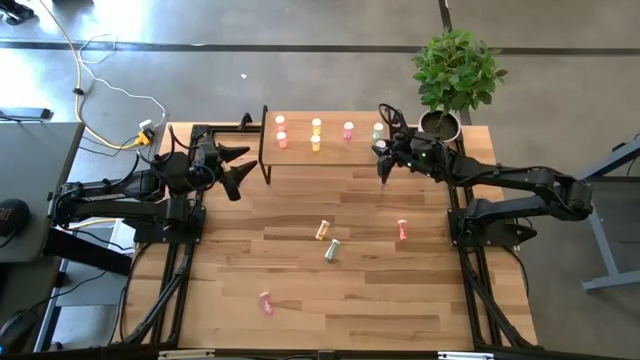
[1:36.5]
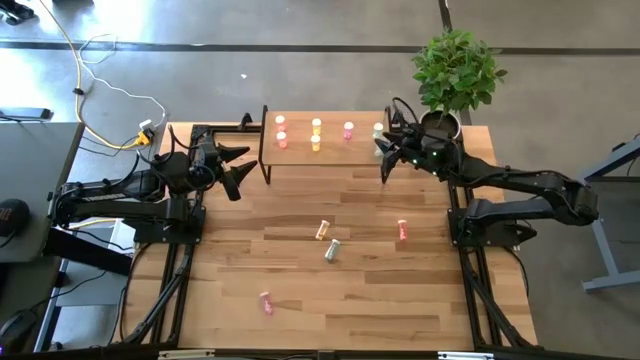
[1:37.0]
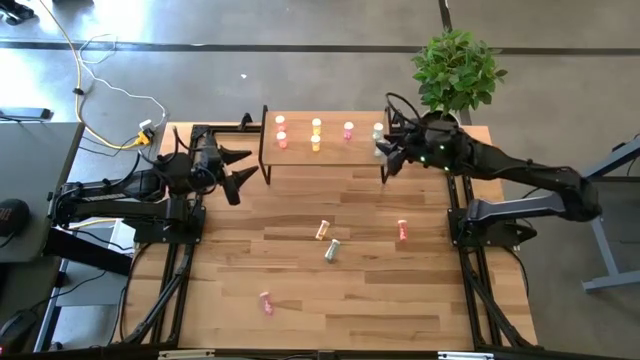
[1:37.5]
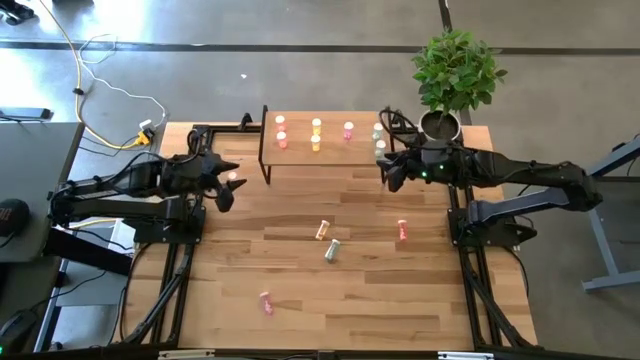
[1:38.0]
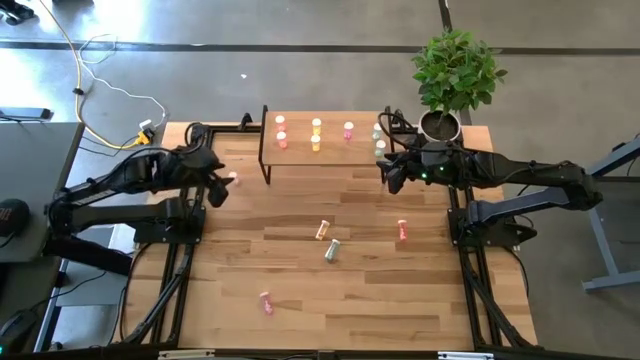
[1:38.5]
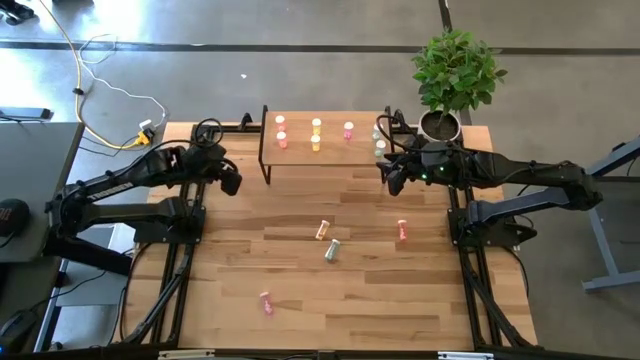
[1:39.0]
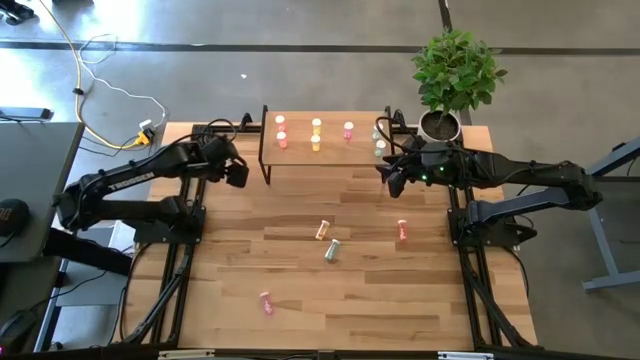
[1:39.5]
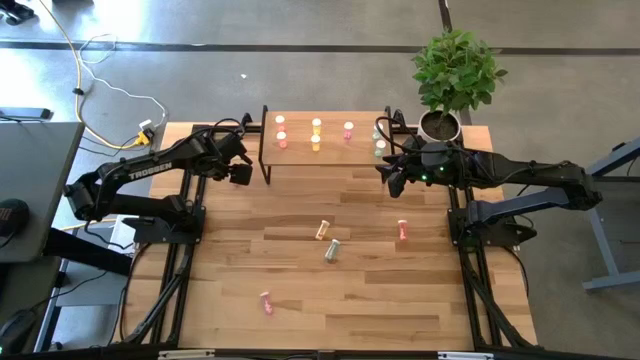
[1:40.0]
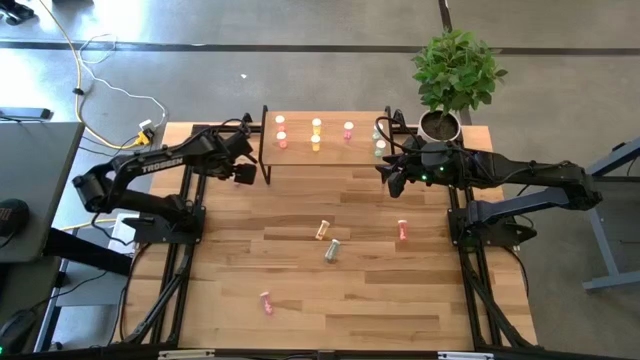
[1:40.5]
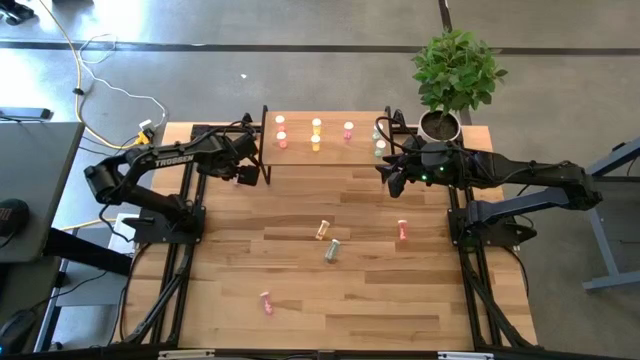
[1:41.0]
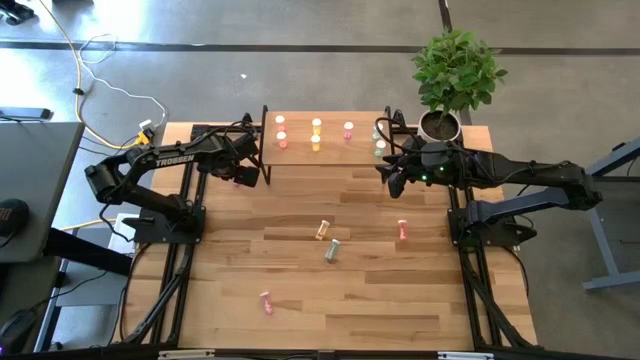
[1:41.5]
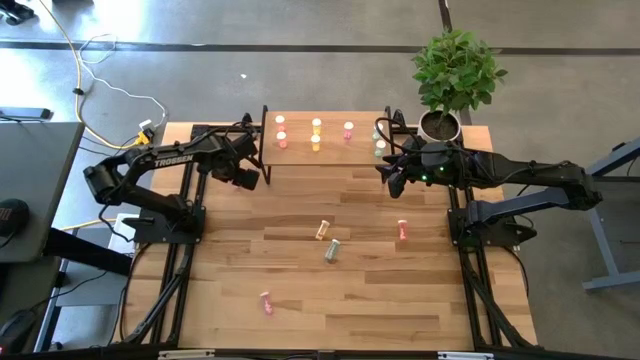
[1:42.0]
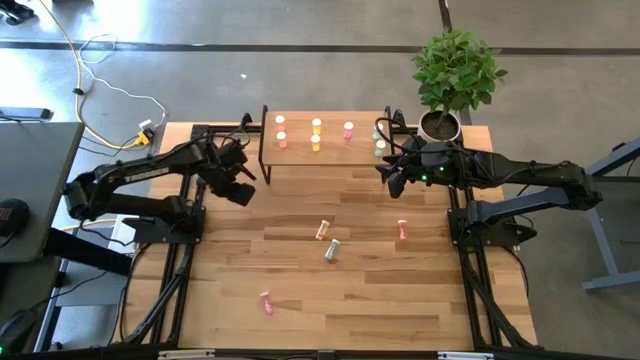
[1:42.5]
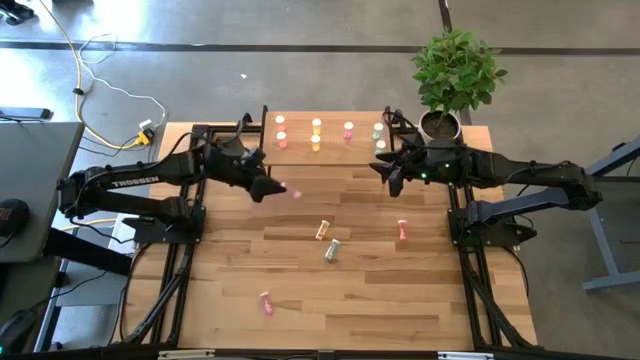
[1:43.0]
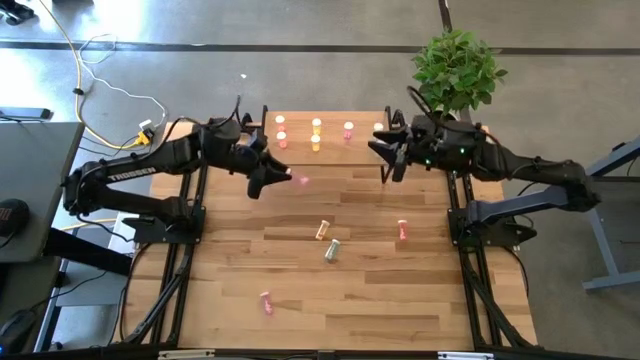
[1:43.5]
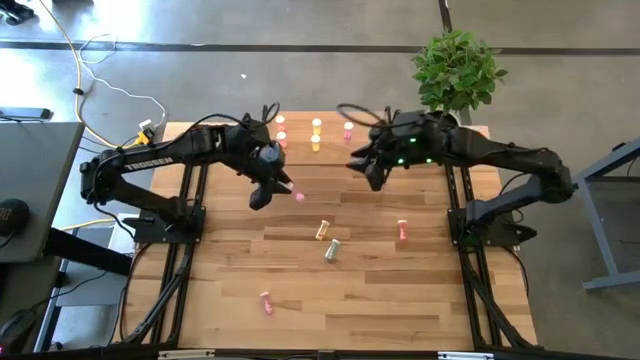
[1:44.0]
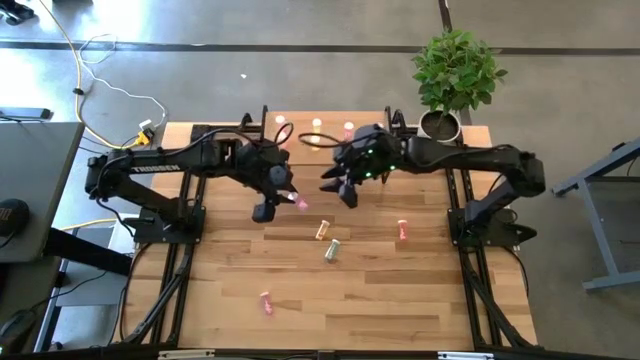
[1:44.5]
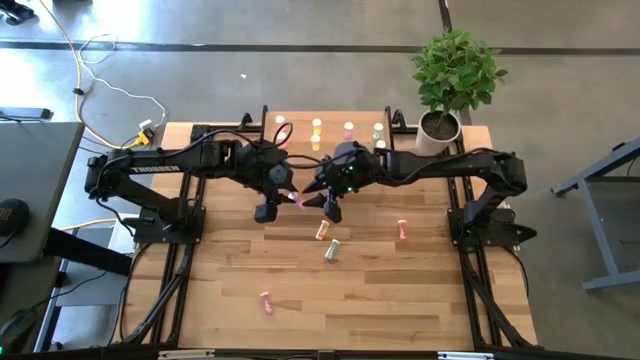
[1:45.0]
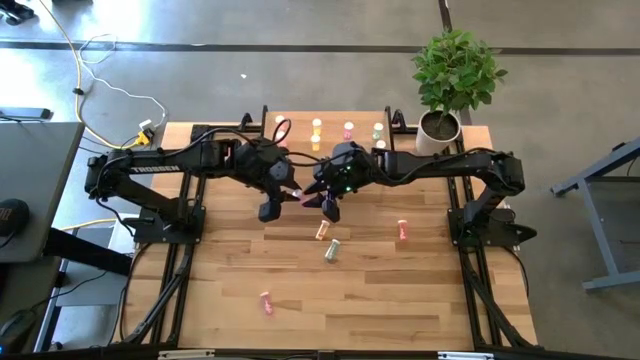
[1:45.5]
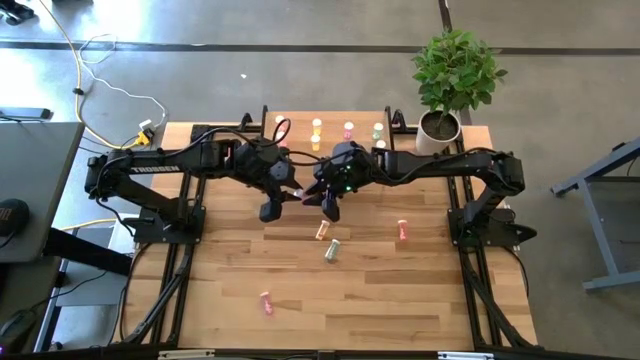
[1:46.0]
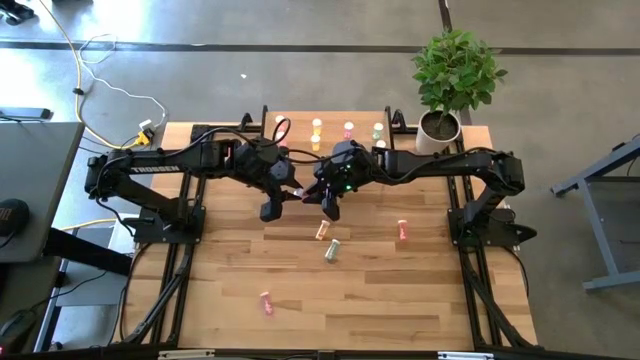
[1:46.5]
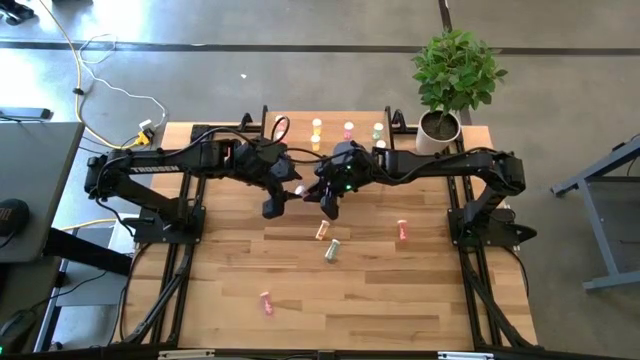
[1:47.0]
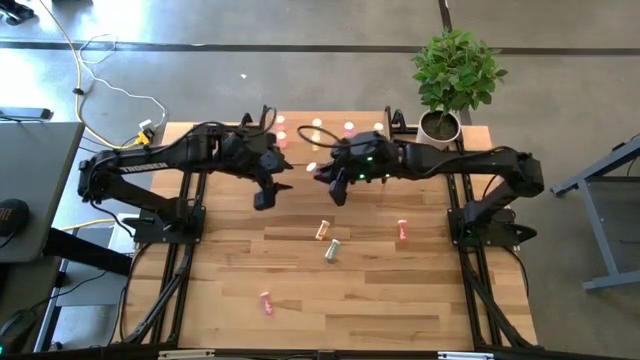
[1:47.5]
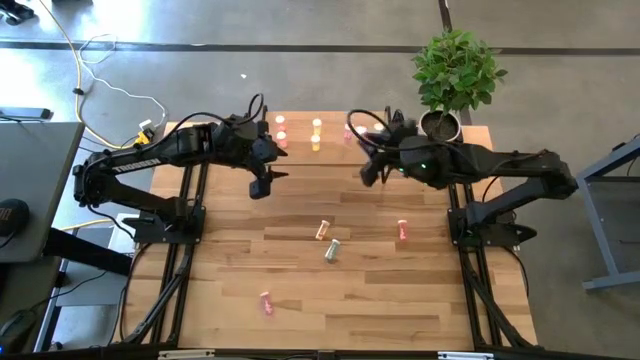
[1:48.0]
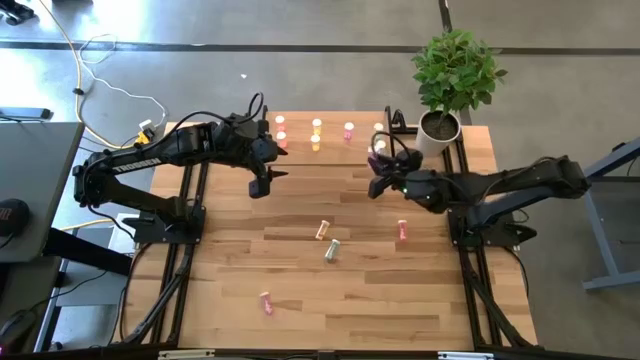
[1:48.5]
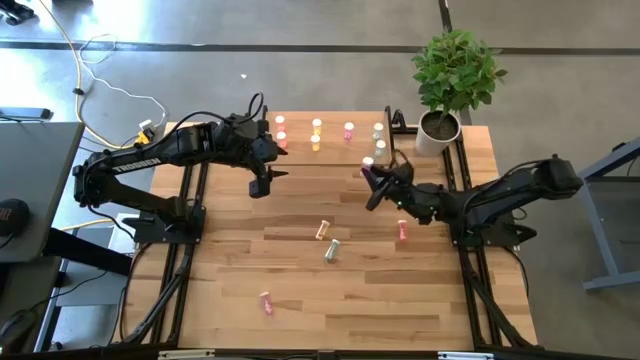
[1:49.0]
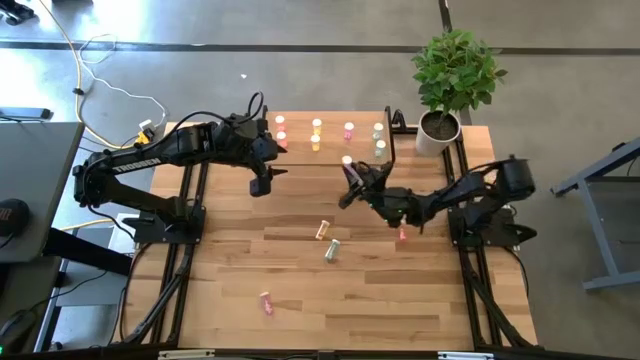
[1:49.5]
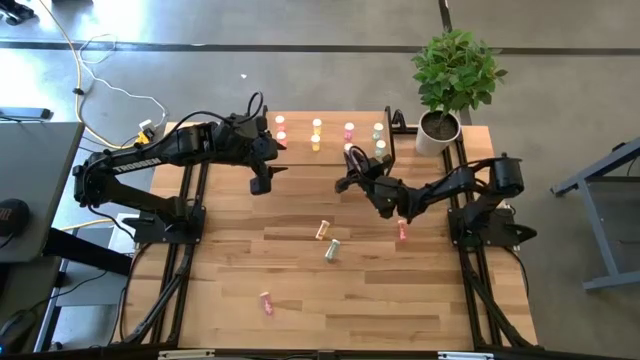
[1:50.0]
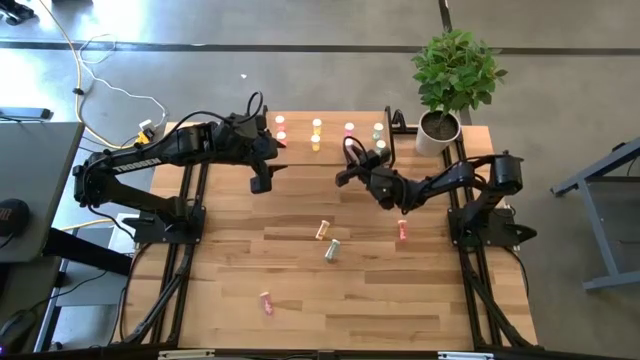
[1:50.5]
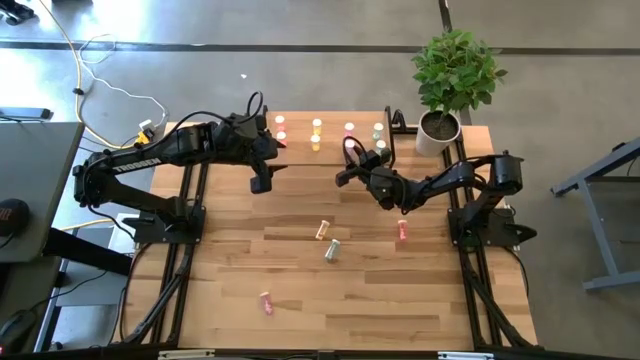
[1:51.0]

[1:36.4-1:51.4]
Task: Pick and place medicine bottles onto shelf by color
Put the top purple pill bottle on the shelf aligned with the purple pill bottle

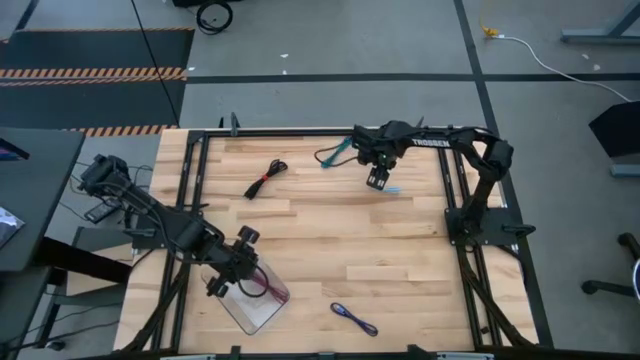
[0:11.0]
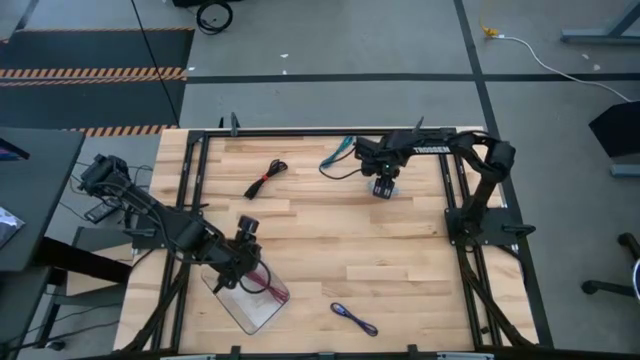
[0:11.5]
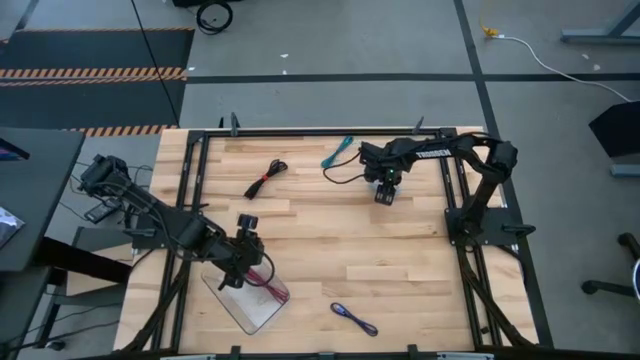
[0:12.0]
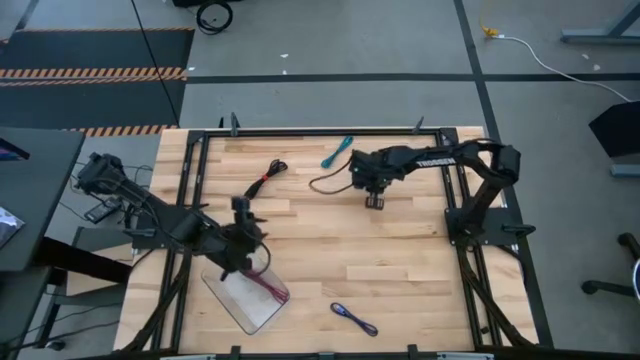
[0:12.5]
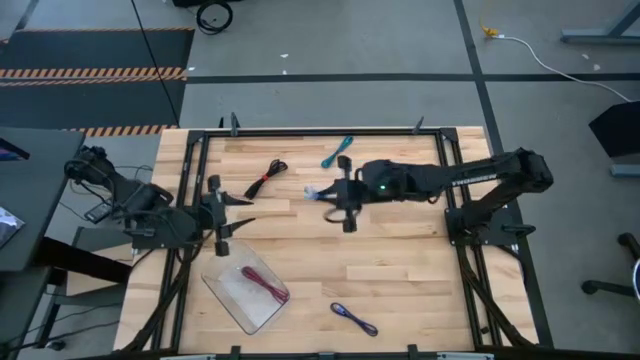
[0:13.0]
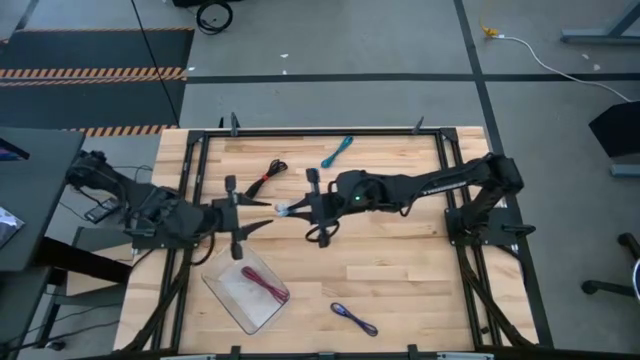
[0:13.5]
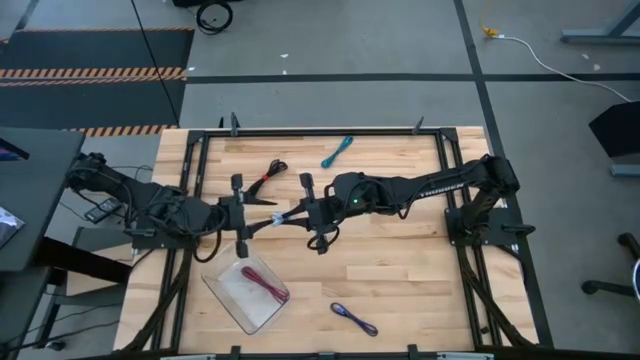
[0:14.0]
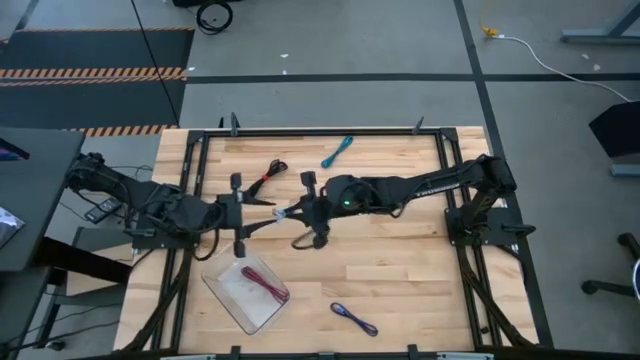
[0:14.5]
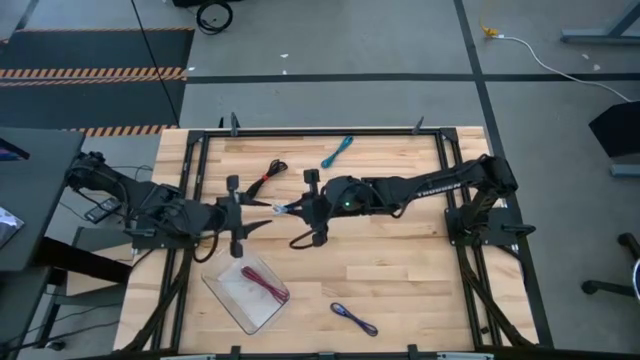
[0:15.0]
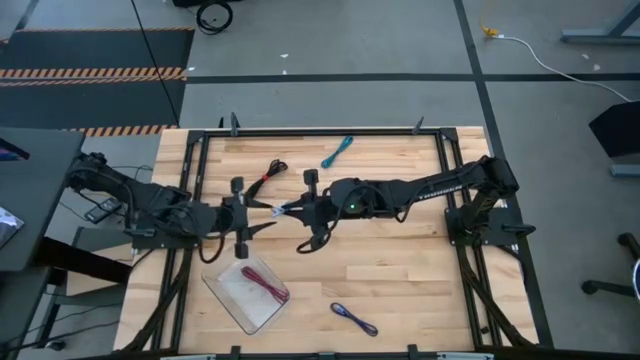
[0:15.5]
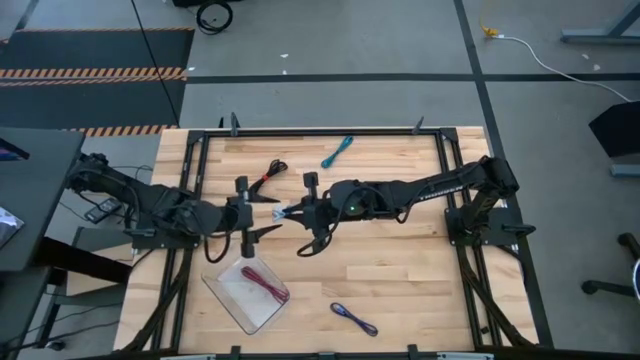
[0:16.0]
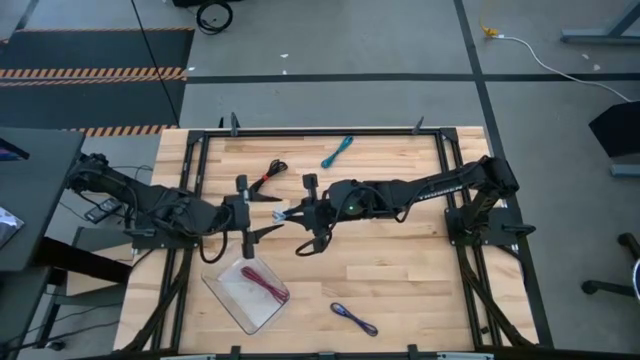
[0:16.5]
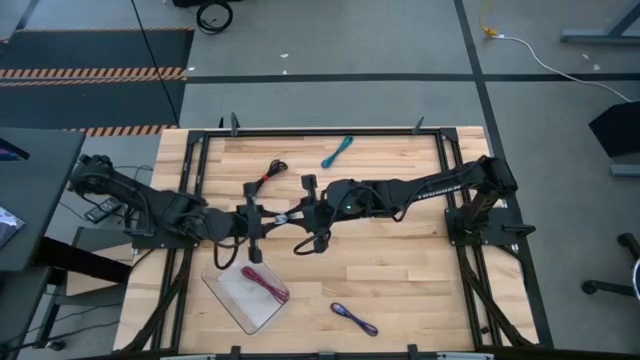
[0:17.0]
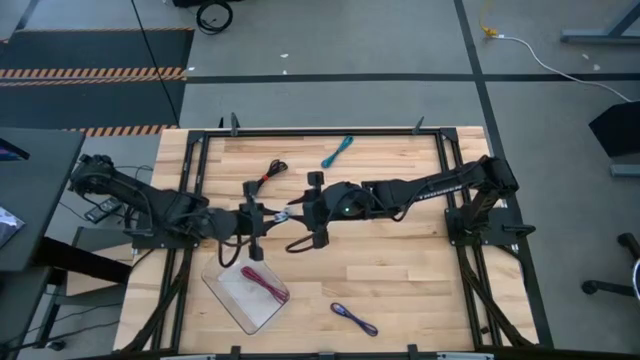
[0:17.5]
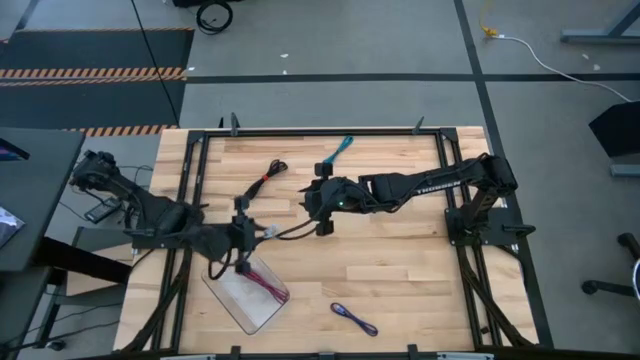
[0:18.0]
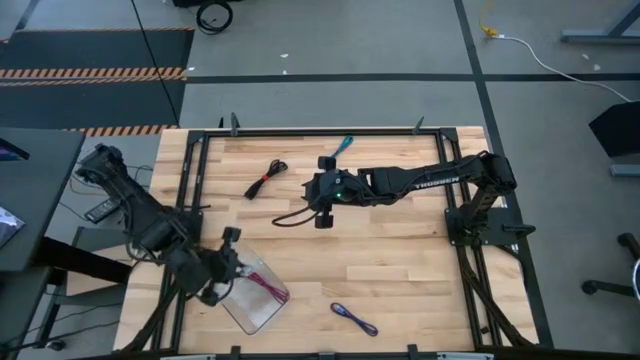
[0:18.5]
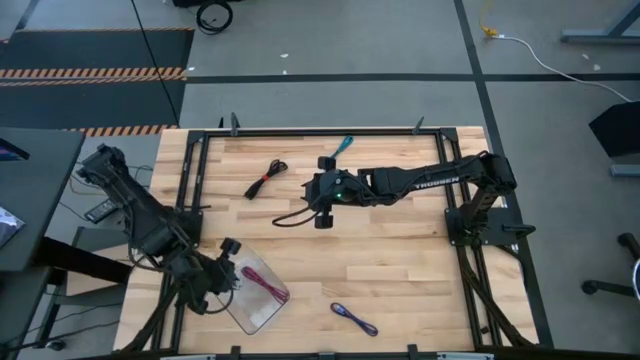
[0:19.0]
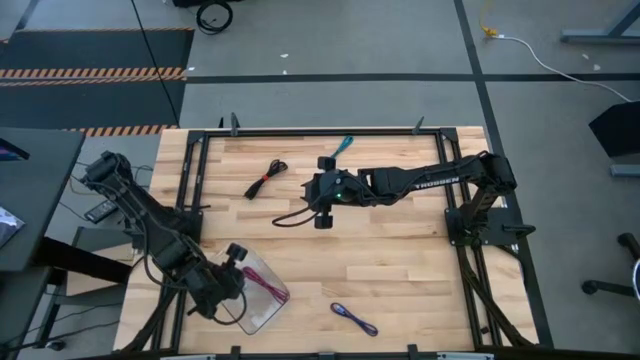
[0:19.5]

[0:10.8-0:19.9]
Task: Pick and place USB-C Cables
Put the light blue charger cable into the transparent bin
